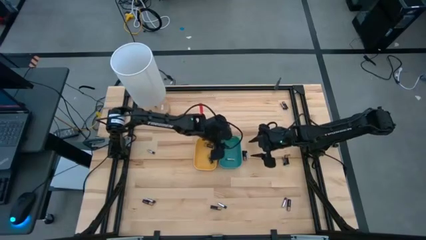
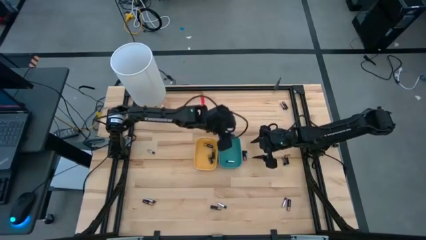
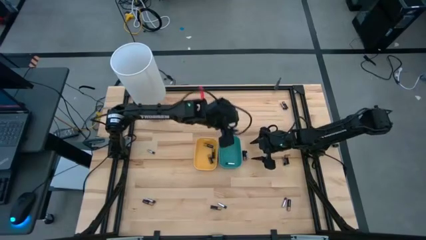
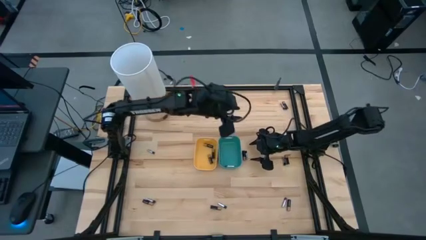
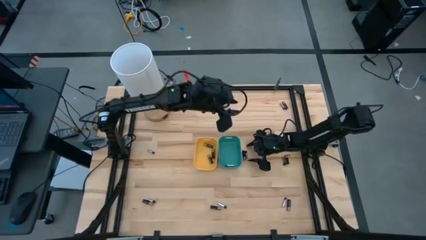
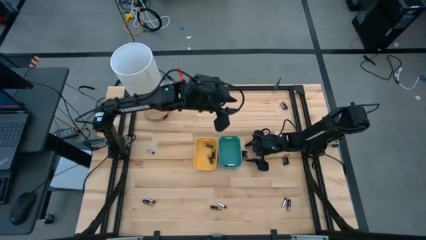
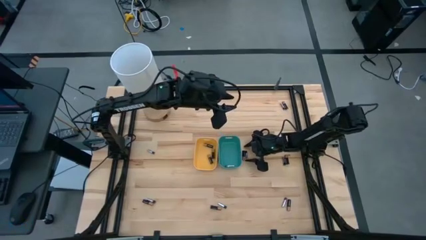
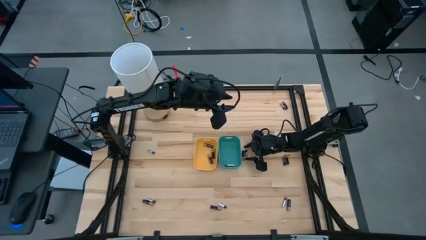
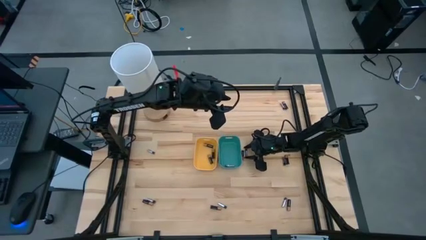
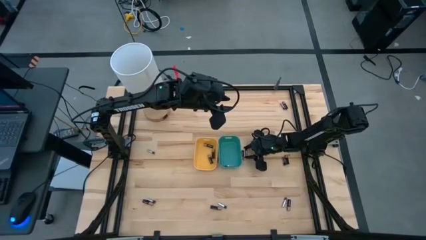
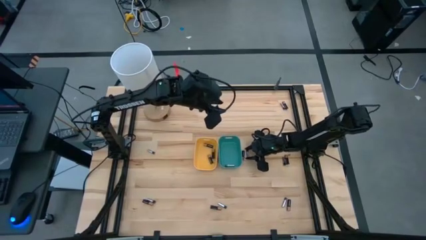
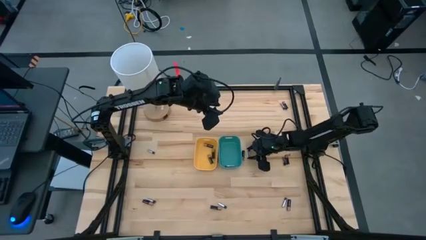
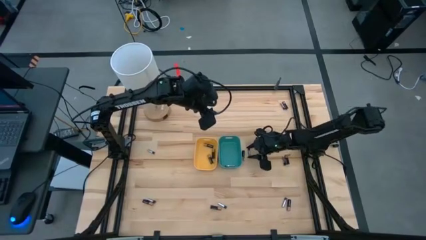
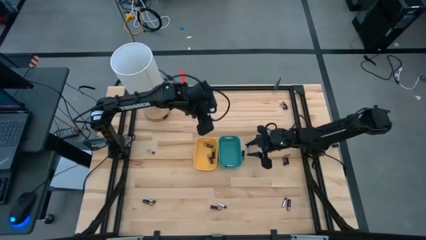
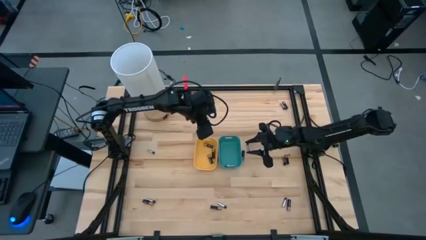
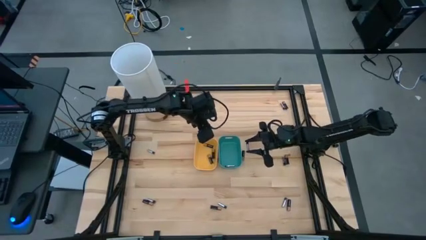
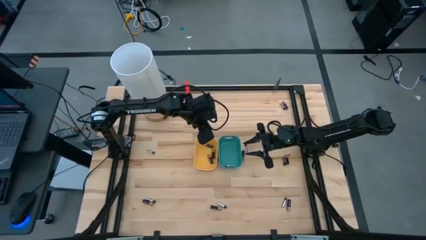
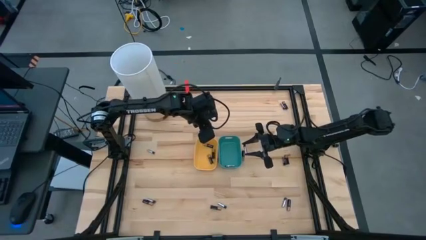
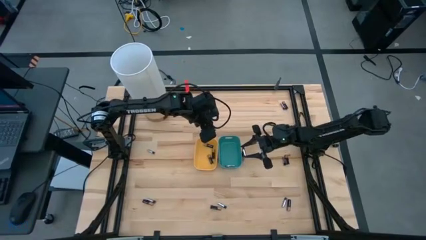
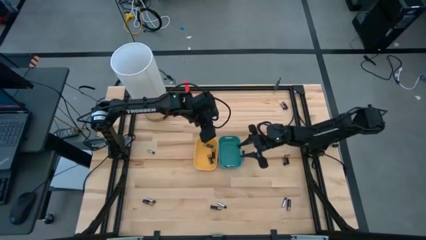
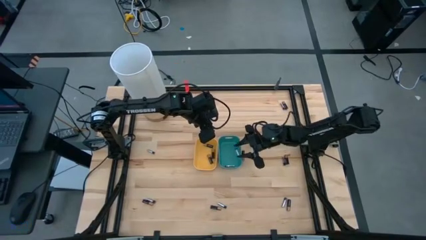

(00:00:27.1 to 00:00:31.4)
Task: Sort batteries
Put the silver battery into the blue bin

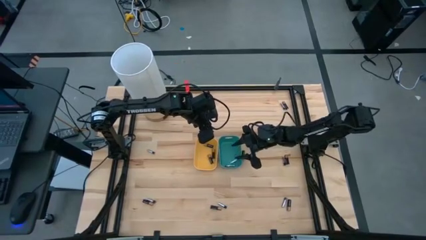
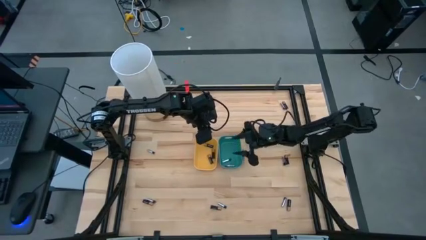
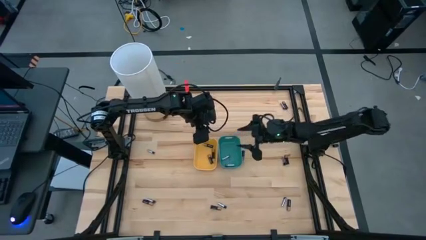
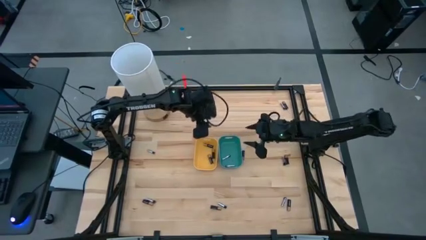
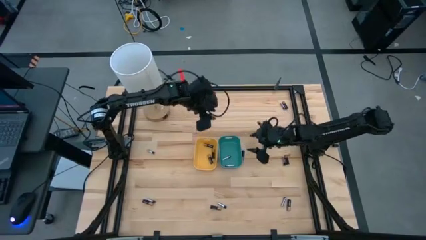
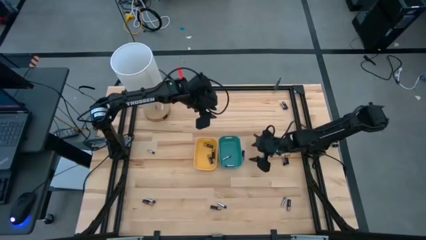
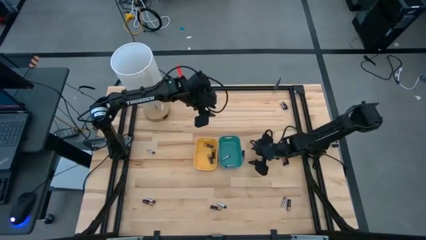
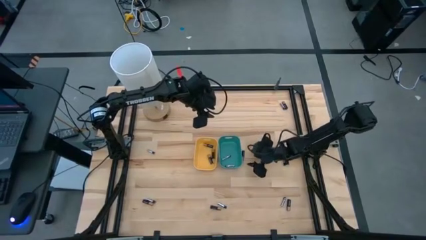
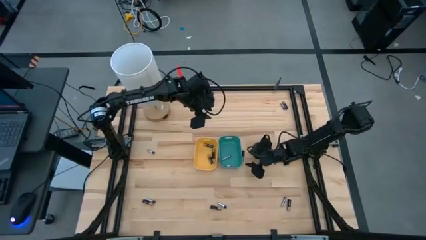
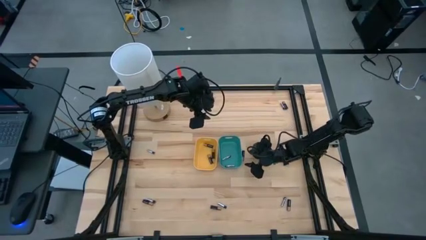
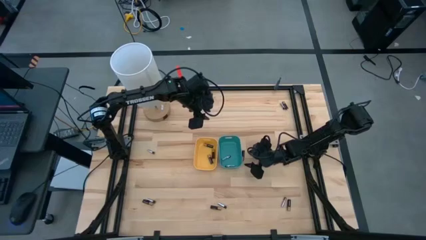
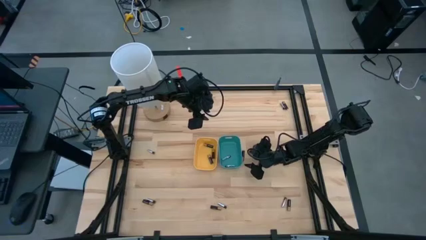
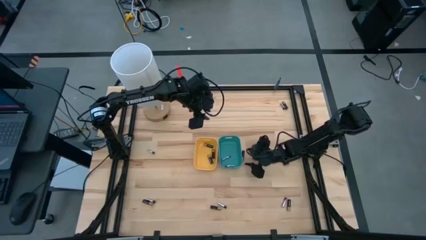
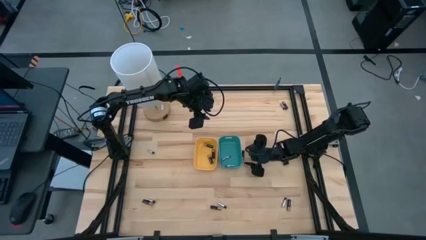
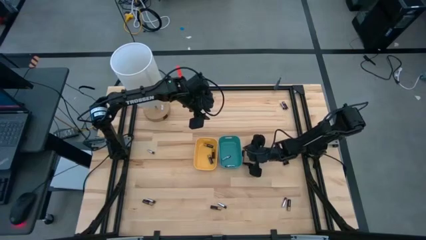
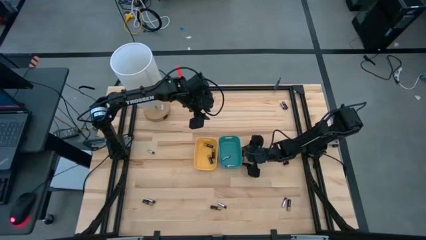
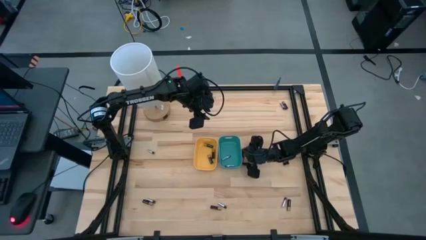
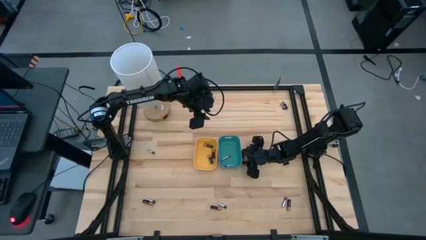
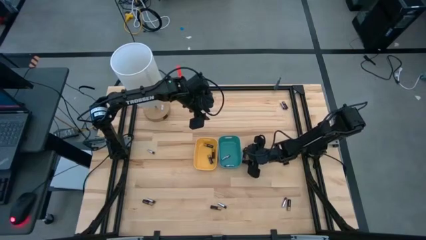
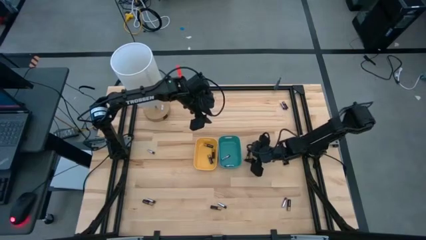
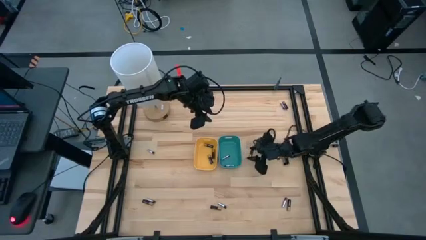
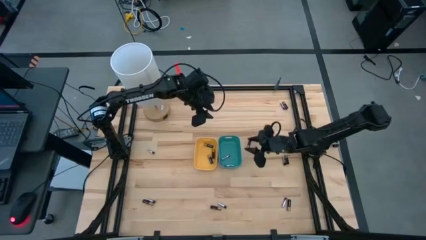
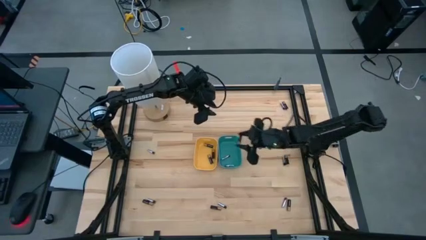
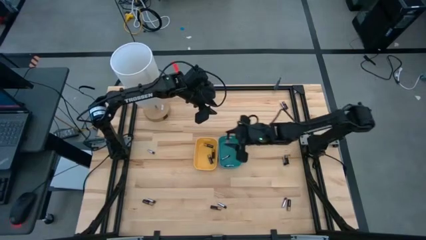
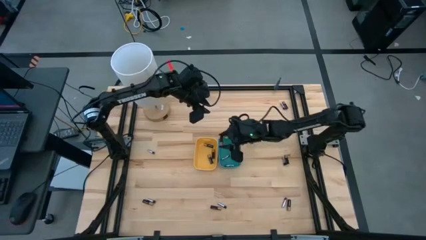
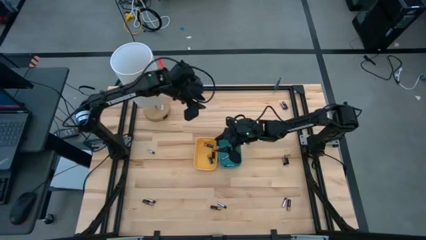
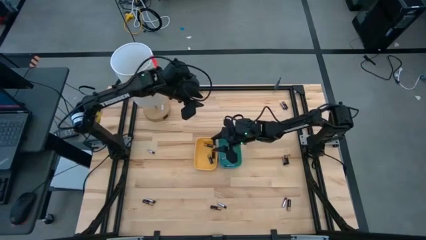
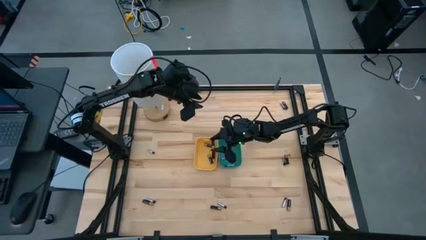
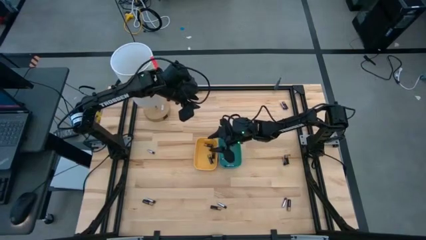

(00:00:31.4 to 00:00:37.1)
Put the black battery into the yellow bin

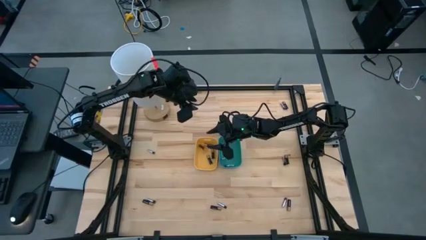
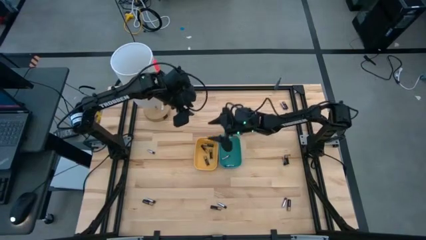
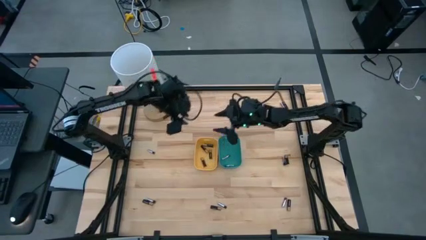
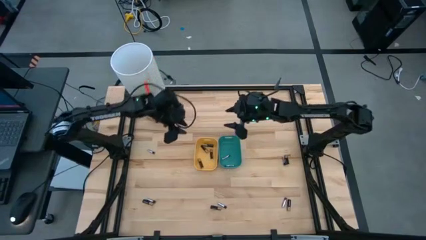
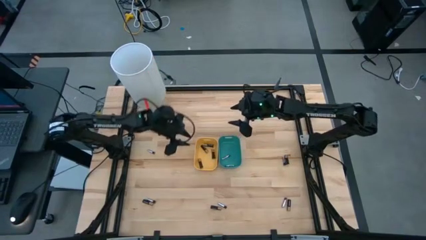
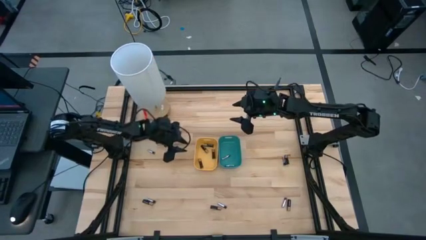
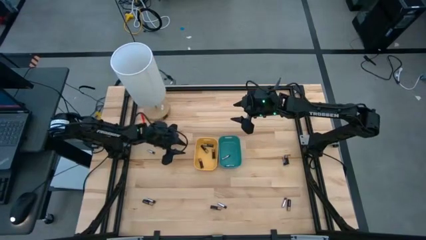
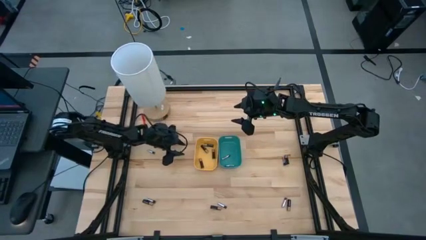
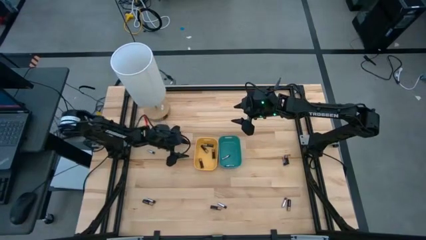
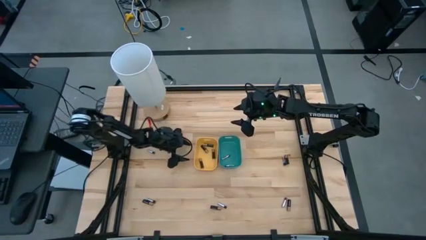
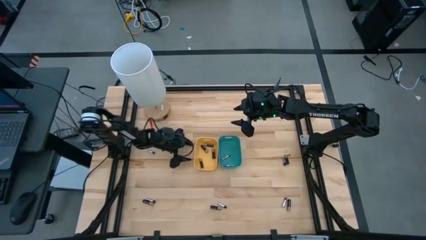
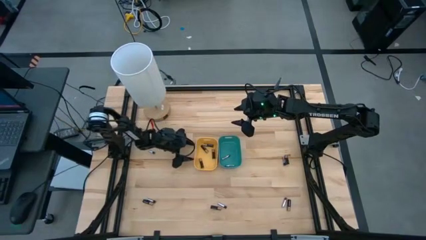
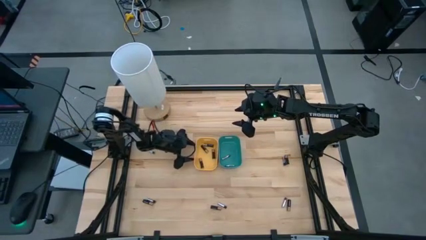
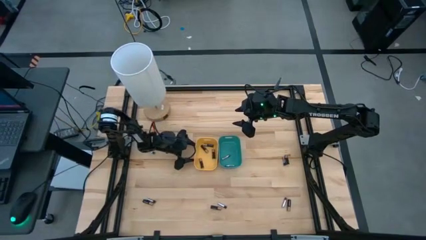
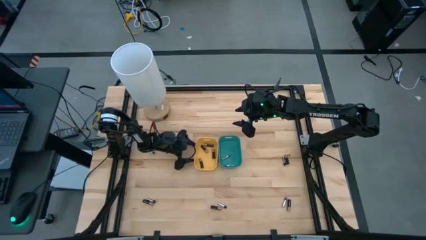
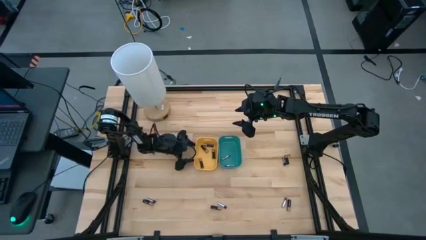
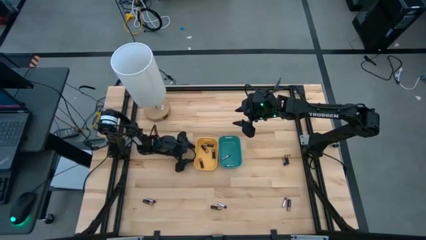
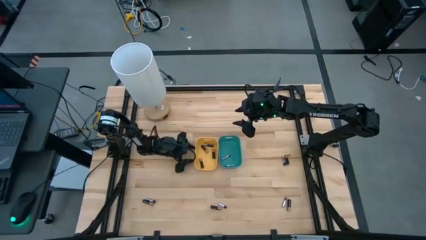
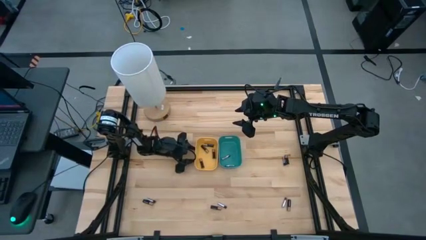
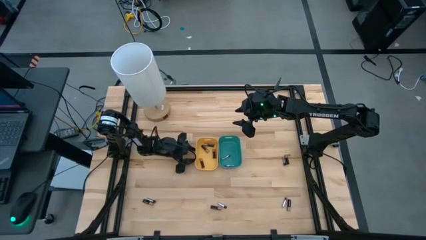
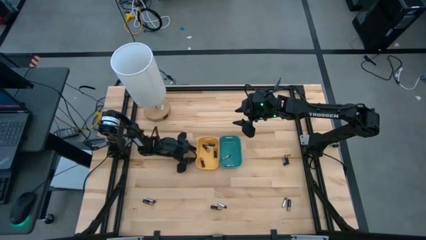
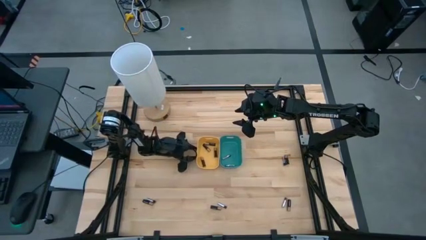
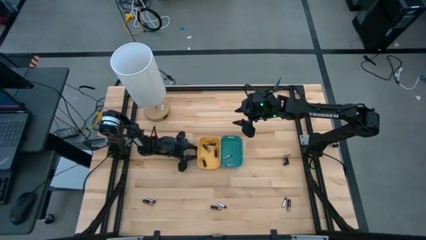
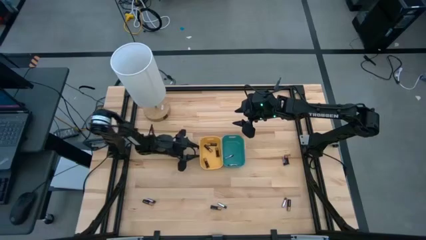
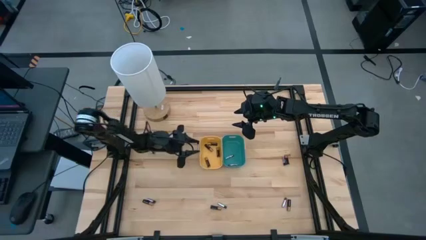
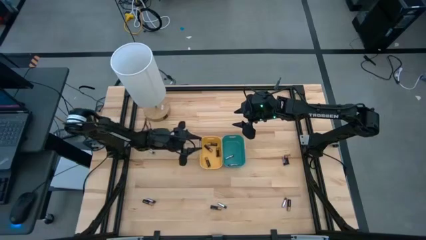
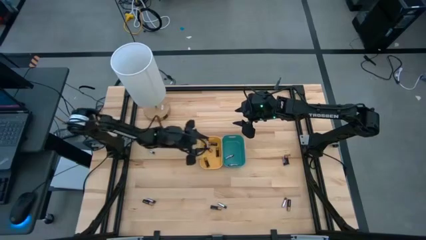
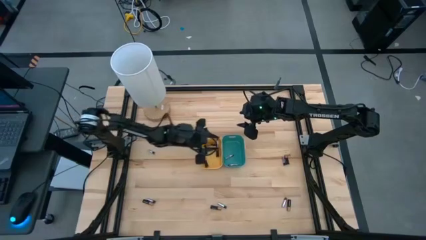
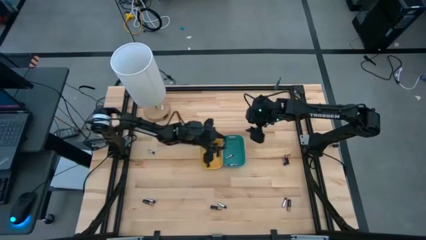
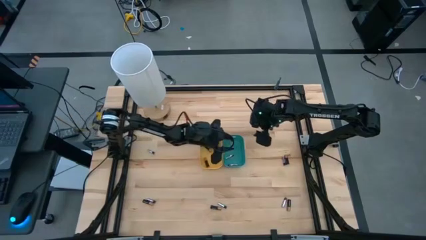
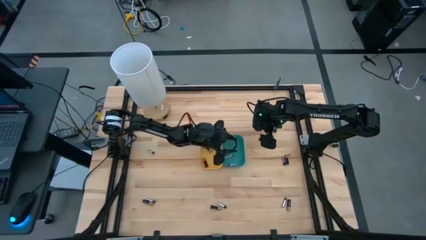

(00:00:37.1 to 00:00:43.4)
Put the silver battery into the blue bin
